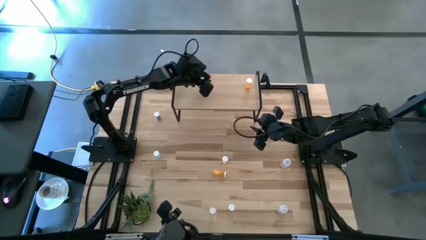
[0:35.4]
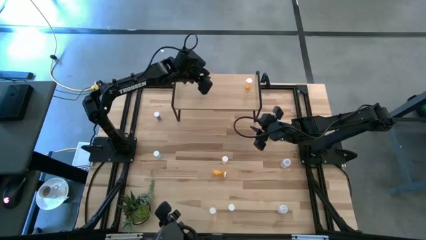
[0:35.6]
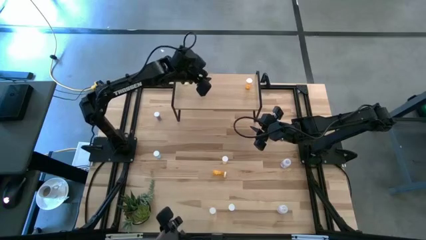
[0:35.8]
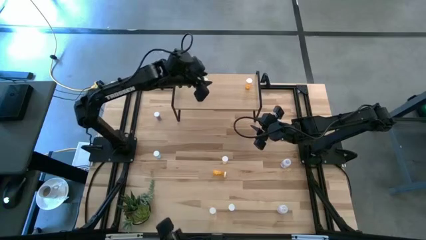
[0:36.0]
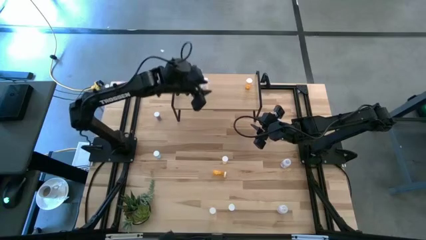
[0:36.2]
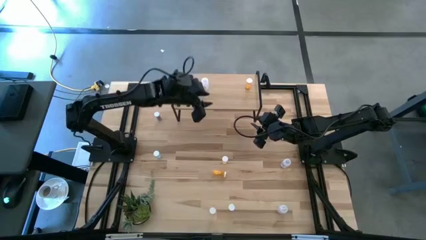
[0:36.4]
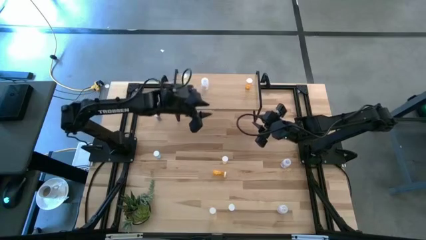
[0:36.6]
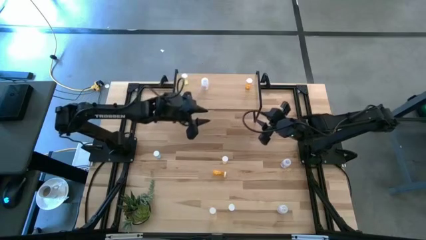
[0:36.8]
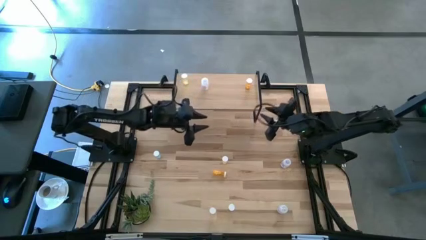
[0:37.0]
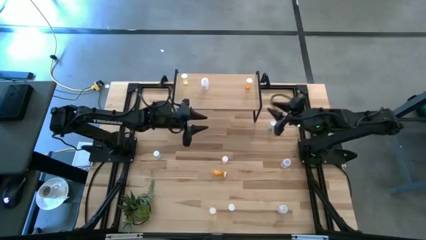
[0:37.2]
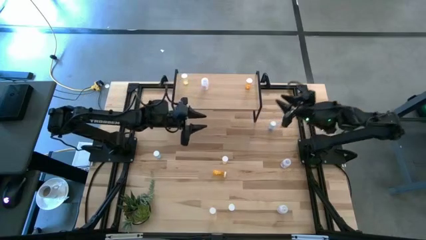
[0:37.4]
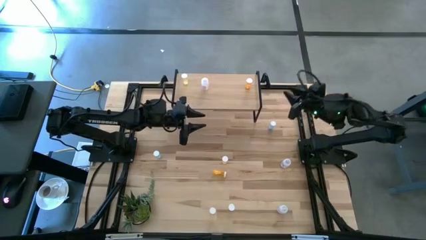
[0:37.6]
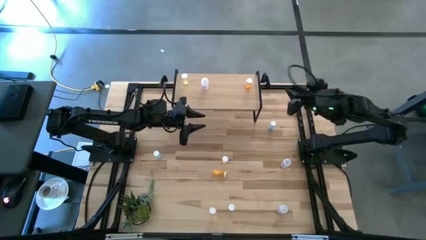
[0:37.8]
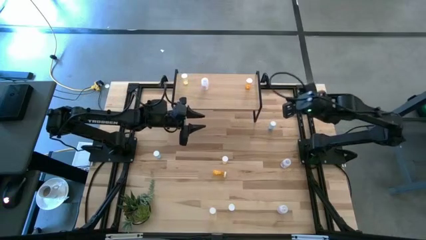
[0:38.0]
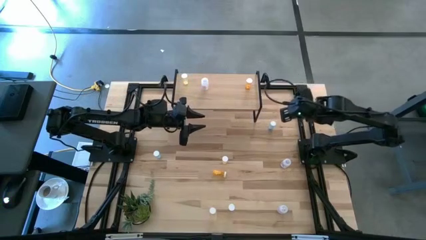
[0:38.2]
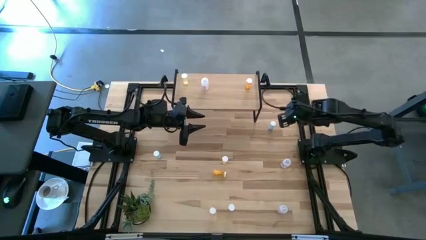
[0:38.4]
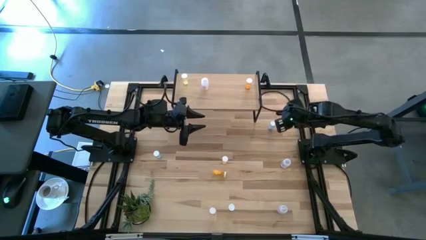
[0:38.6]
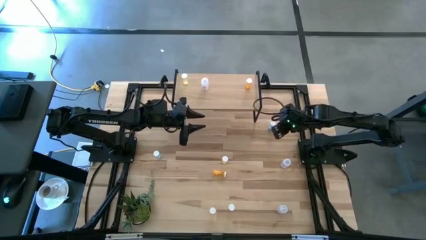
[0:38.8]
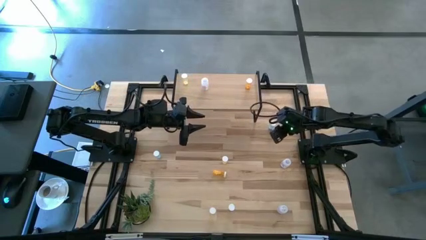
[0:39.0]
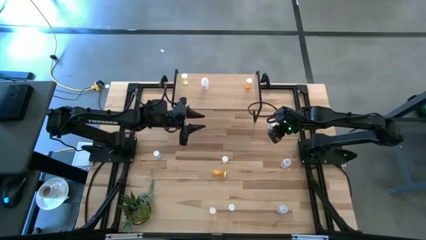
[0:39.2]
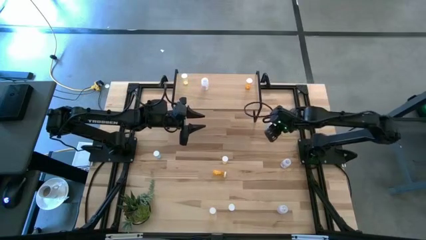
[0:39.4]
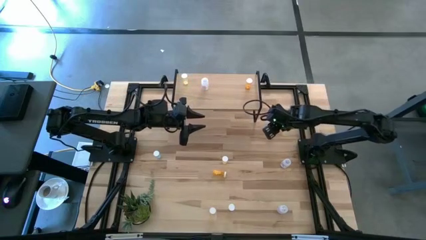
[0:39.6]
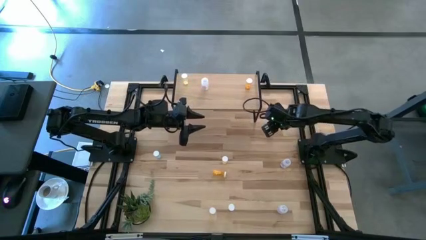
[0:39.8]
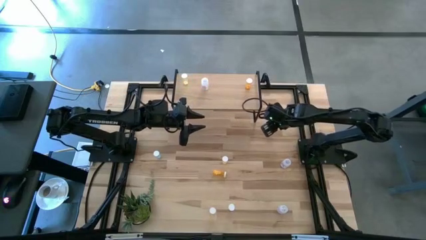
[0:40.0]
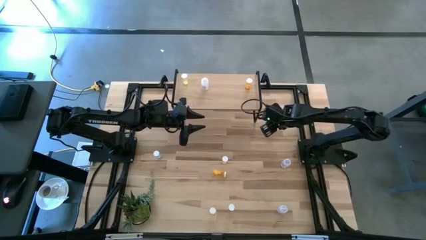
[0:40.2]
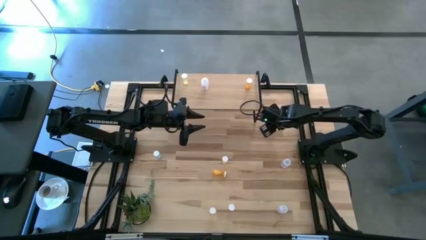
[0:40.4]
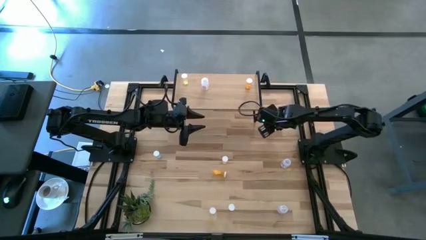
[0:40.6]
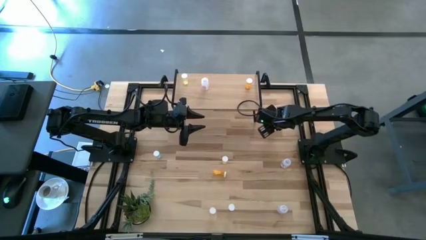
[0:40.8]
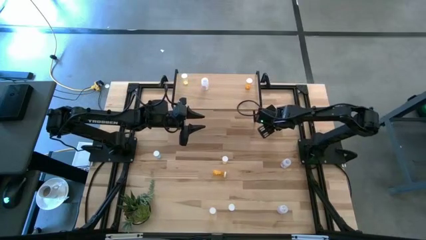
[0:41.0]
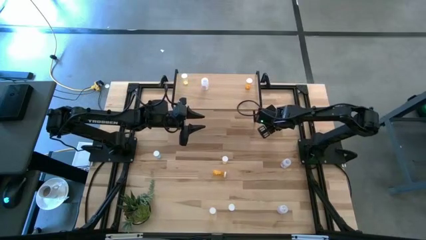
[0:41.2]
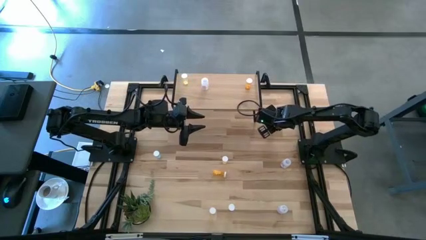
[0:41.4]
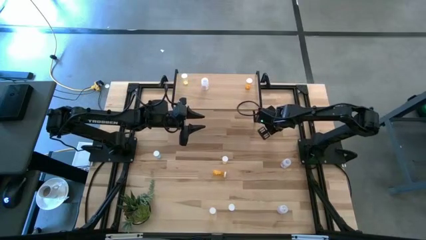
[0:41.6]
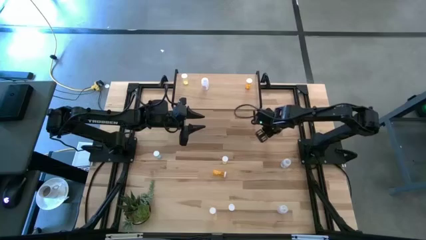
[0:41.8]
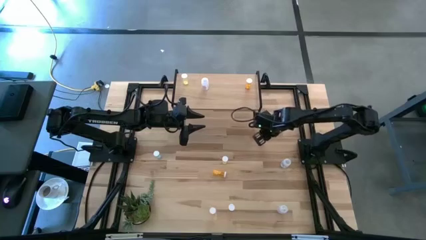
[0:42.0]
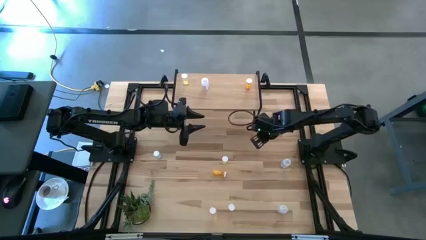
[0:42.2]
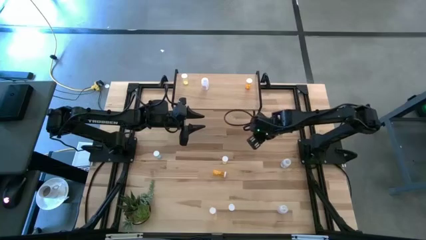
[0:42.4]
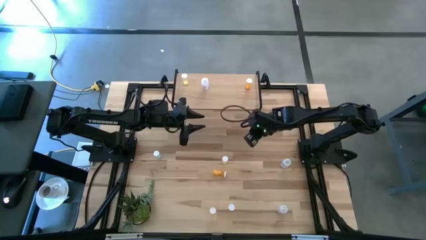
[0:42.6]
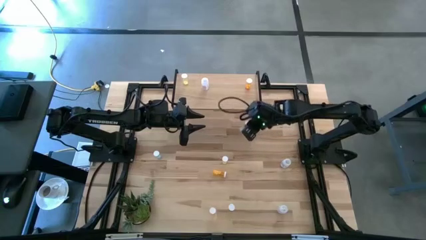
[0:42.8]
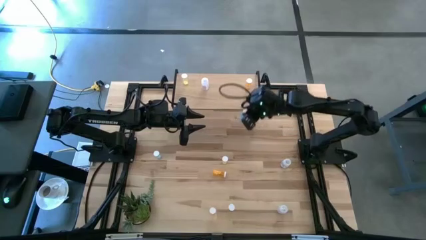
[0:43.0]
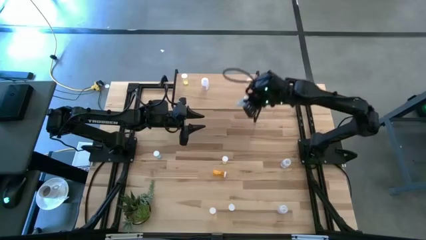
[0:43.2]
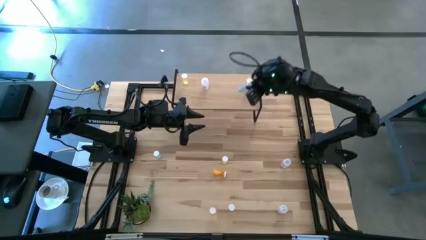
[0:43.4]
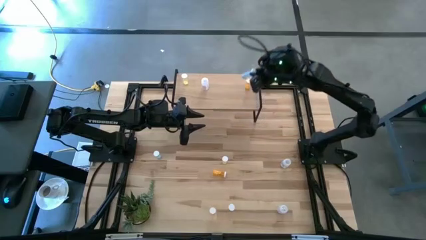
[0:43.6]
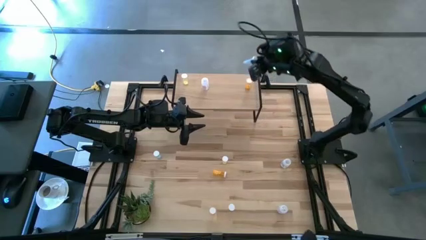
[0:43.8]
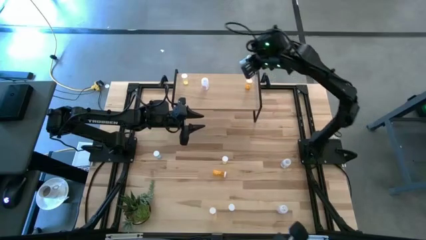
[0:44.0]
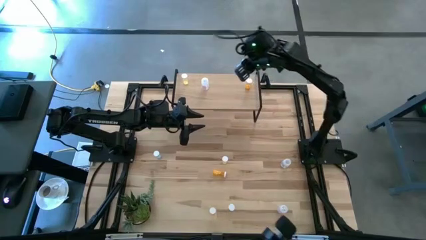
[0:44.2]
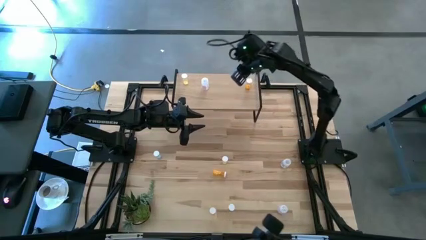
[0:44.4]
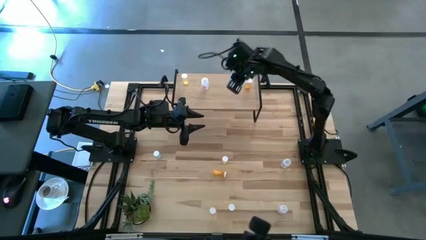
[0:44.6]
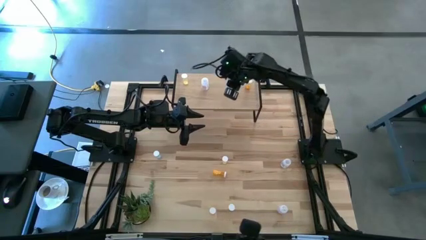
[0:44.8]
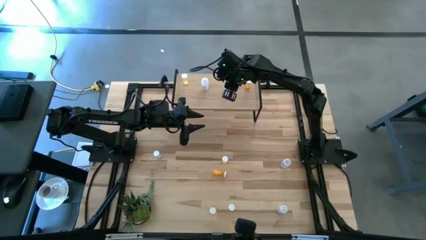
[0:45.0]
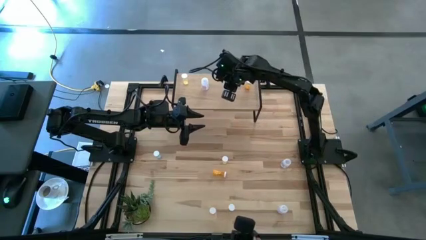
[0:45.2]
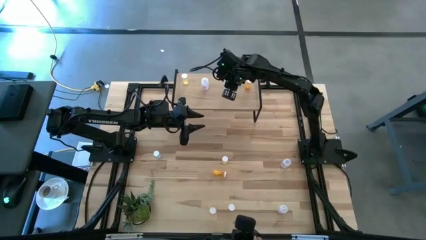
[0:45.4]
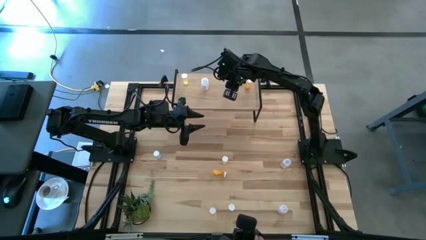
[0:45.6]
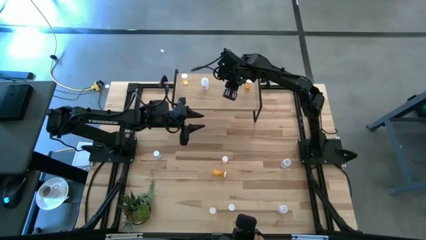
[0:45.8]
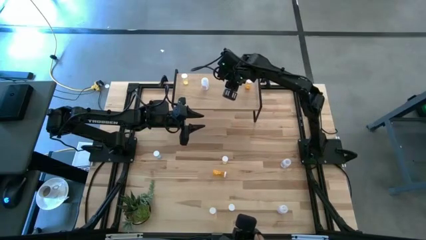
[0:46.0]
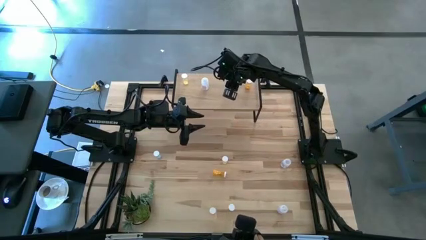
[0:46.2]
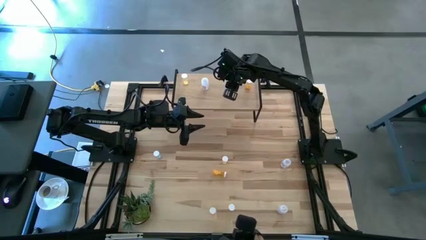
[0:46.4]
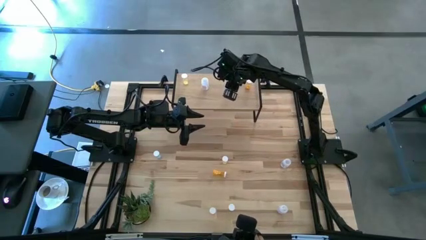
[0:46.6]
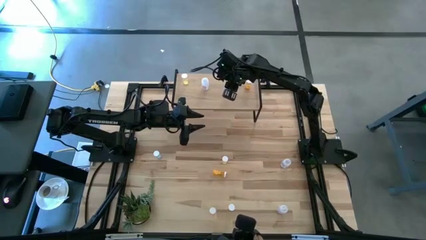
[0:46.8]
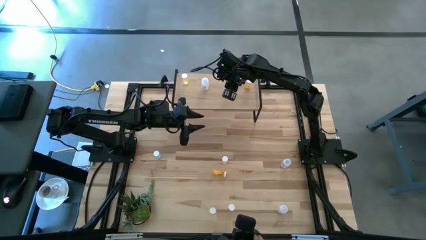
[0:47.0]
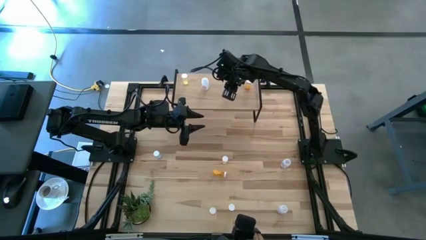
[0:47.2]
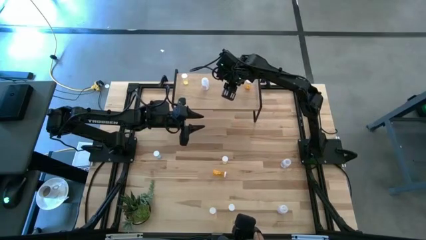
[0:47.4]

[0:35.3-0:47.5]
Task: Pick and place medicine bottles onto shelf by color
Put the top right blue pill bottle on the shelf

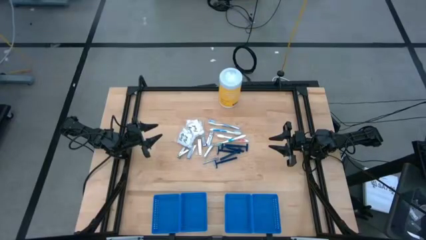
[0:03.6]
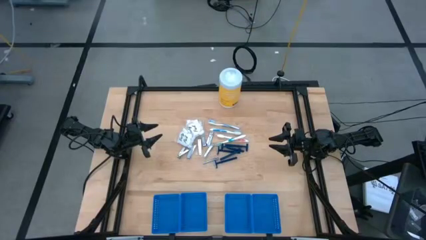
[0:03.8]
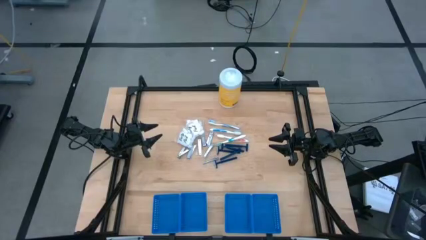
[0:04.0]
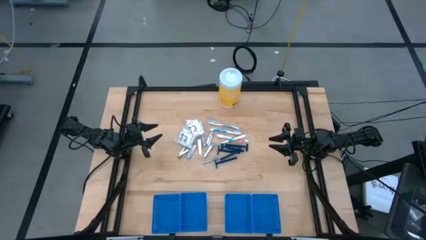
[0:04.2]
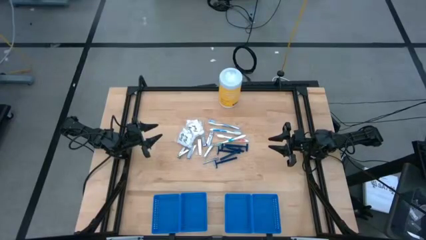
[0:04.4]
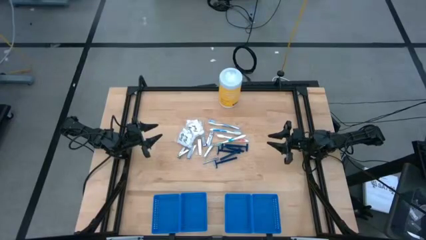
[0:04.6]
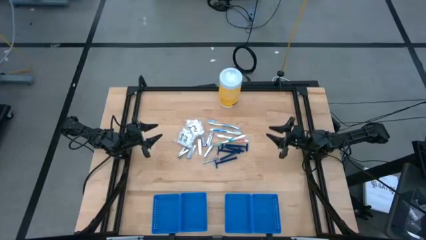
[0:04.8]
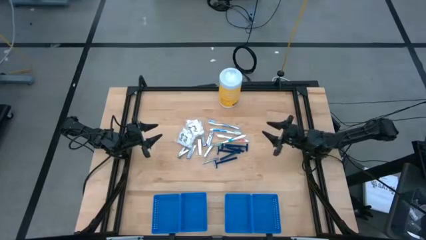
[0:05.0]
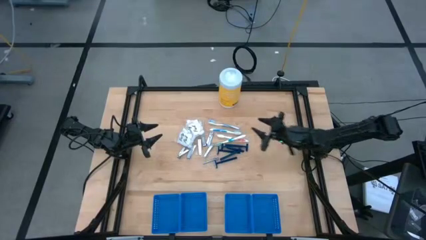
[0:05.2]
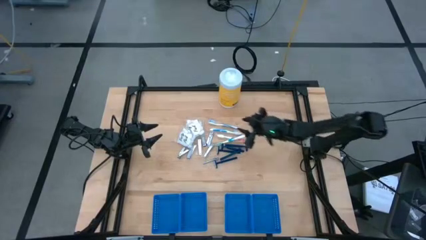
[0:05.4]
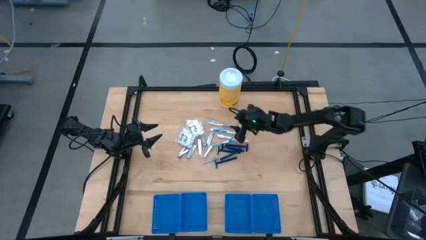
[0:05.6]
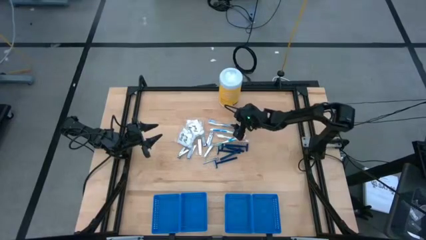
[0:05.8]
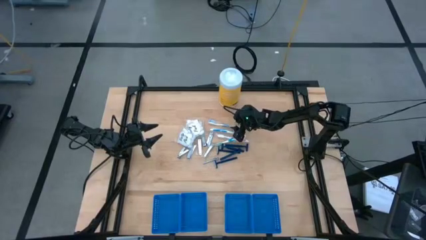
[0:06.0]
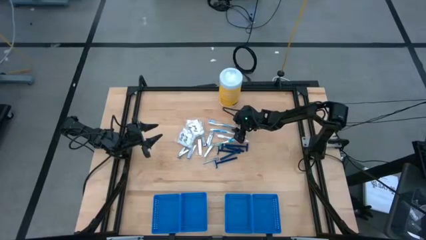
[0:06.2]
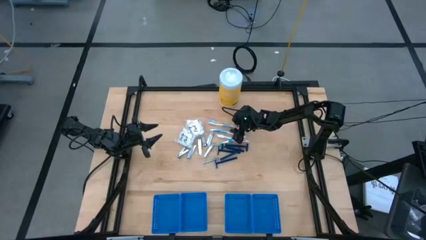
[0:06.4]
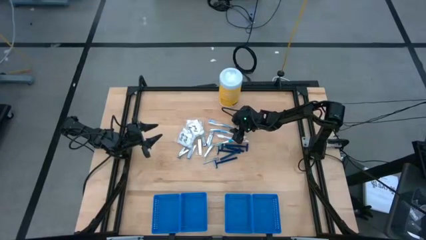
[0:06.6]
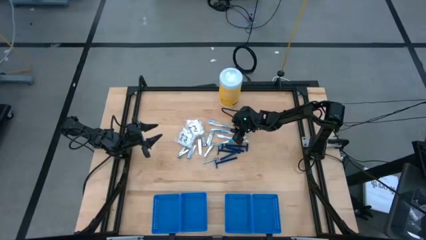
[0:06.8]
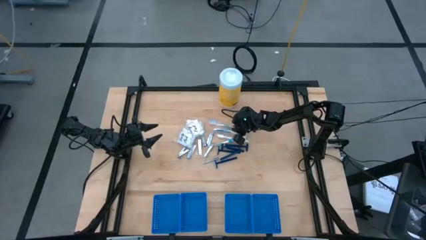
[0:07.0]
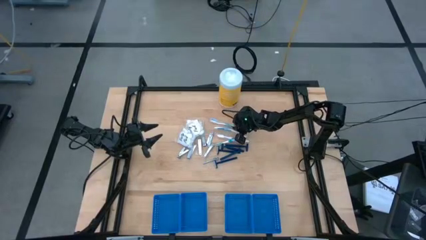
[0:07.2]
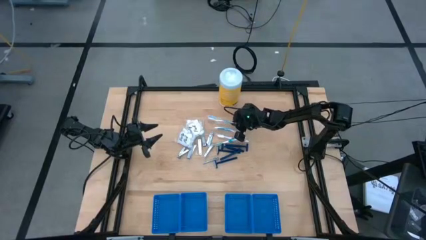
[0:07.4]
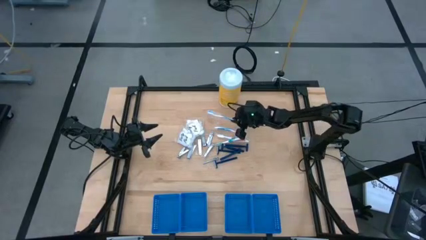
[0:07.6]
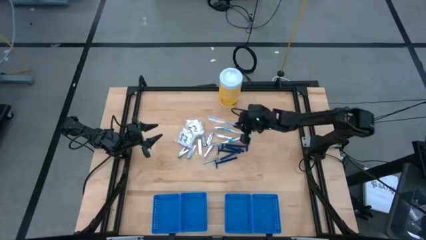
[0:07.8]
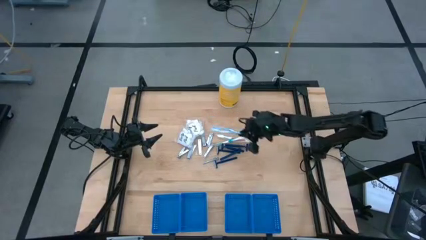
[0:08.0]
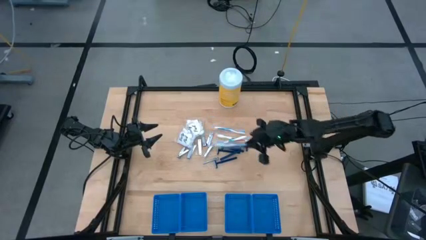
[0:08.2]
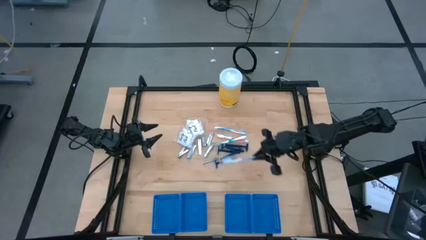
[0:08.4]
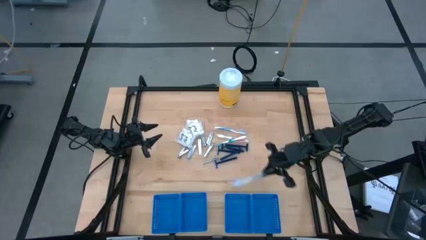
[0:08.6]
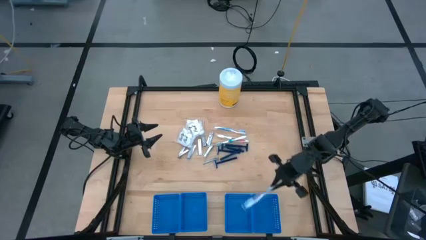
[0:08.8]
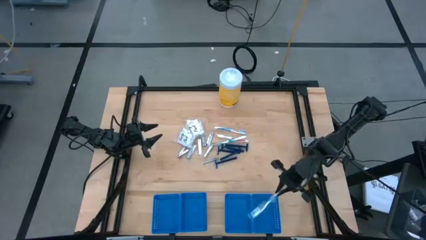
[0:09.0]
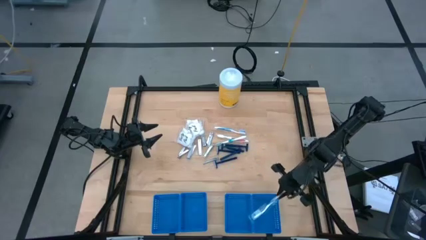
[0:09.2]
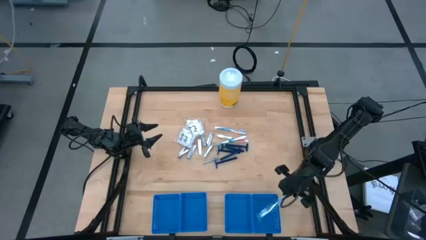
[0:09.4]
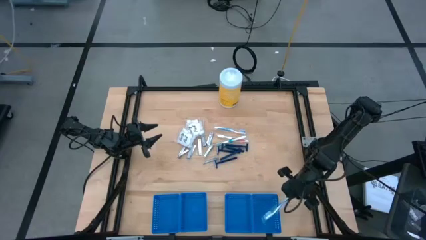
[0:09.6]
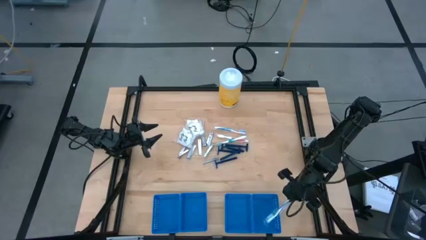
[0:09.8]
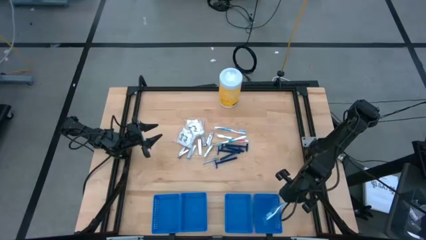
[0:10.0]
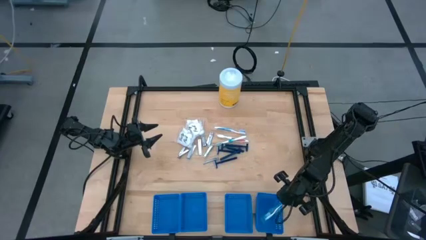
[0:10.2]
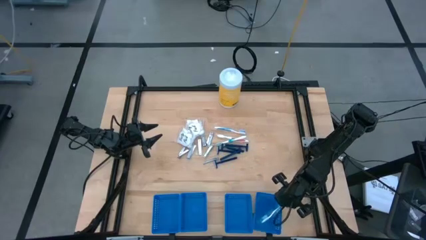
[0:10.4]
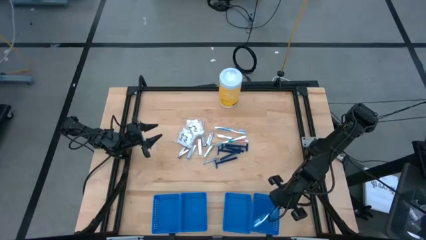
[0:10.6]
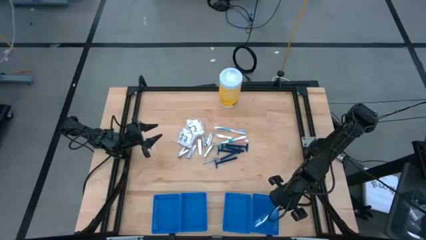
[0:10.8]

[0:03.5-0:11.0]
Task: Pick & Place Travel size toiletries
Put the blue toothbrush into the blue basket
